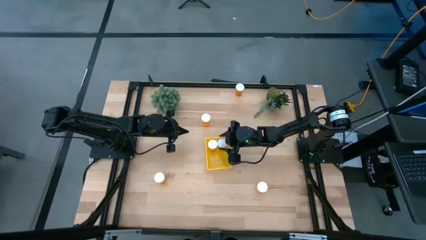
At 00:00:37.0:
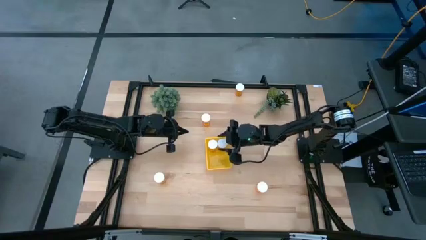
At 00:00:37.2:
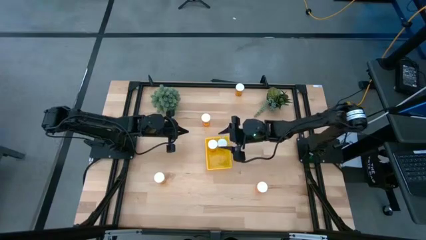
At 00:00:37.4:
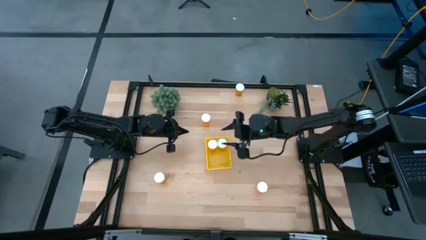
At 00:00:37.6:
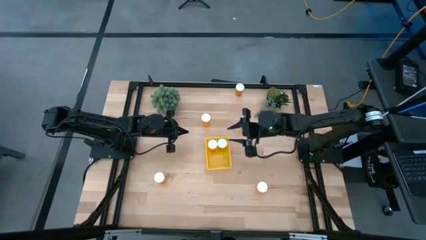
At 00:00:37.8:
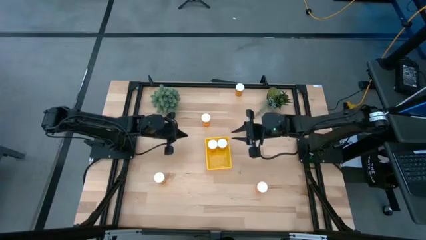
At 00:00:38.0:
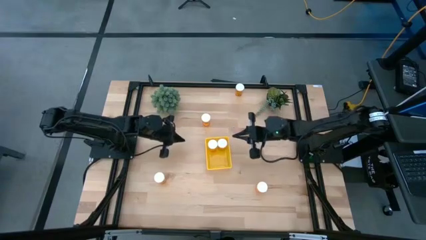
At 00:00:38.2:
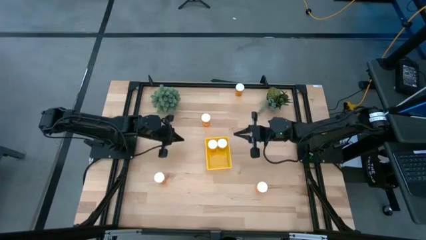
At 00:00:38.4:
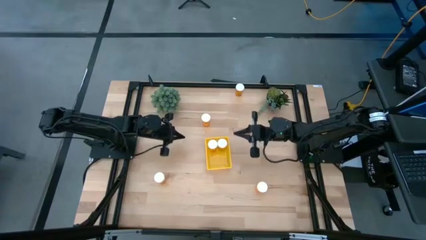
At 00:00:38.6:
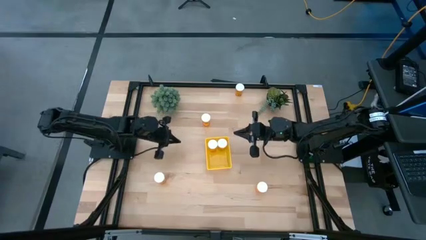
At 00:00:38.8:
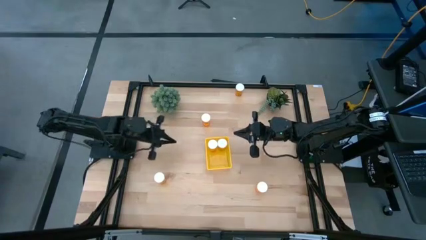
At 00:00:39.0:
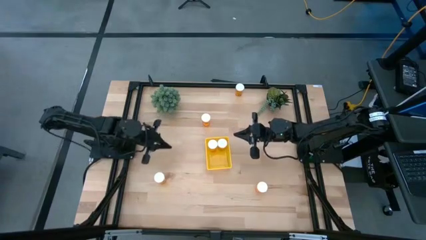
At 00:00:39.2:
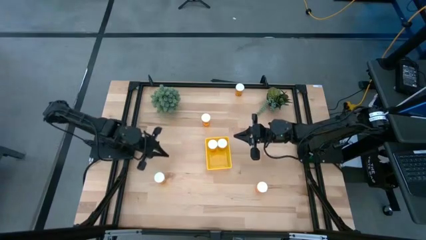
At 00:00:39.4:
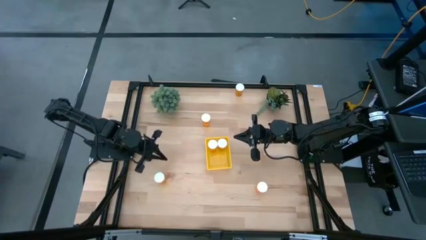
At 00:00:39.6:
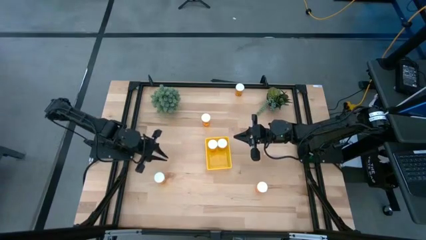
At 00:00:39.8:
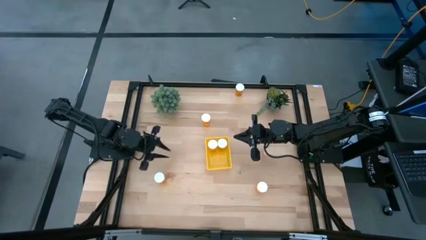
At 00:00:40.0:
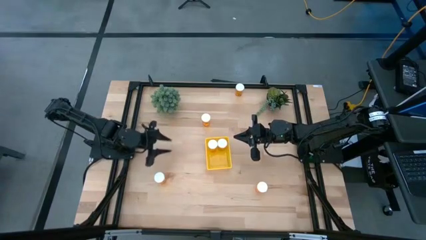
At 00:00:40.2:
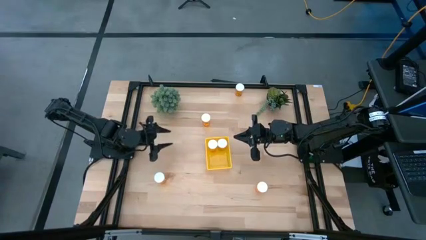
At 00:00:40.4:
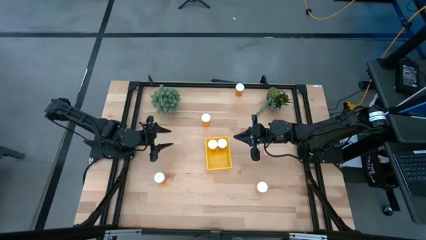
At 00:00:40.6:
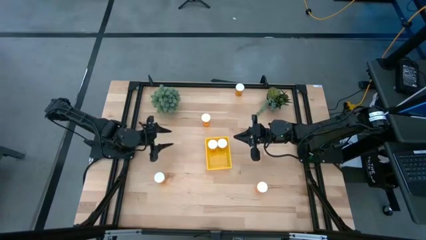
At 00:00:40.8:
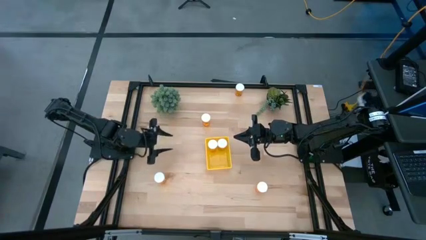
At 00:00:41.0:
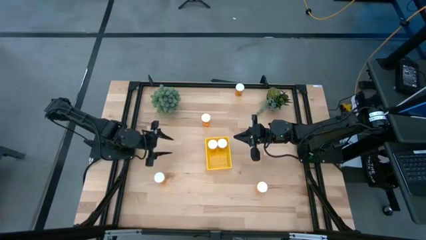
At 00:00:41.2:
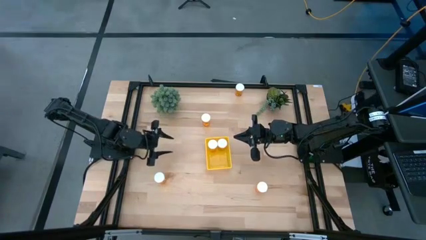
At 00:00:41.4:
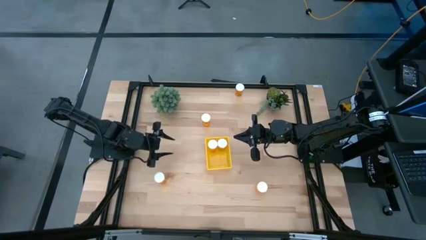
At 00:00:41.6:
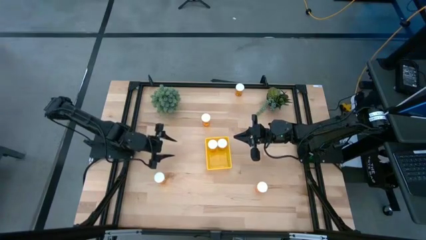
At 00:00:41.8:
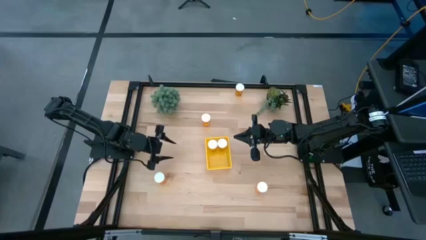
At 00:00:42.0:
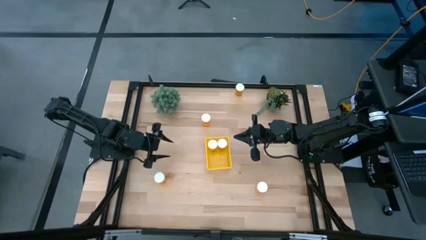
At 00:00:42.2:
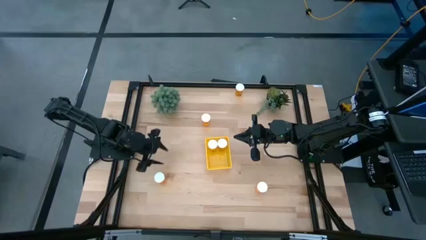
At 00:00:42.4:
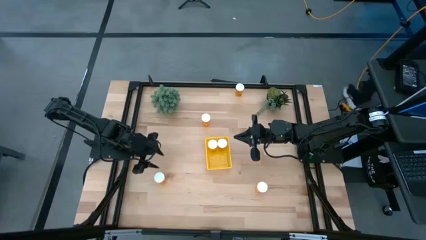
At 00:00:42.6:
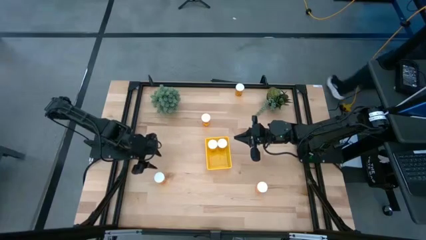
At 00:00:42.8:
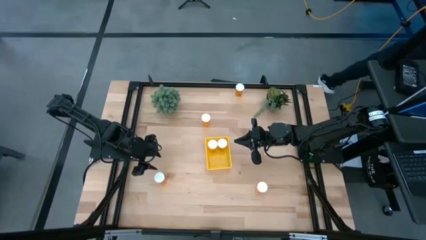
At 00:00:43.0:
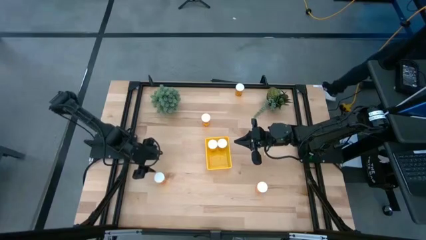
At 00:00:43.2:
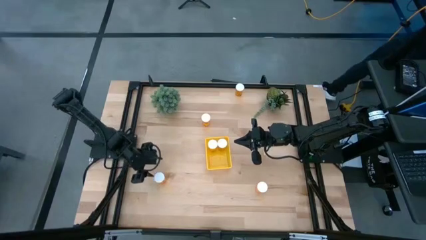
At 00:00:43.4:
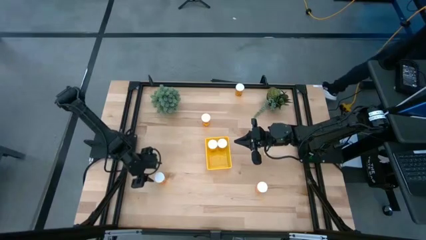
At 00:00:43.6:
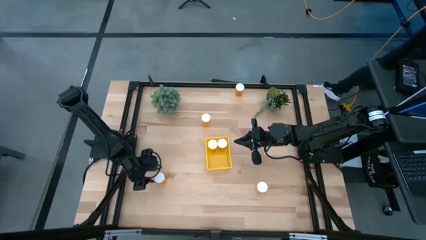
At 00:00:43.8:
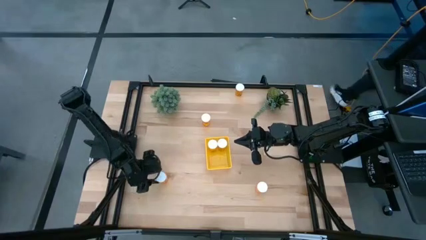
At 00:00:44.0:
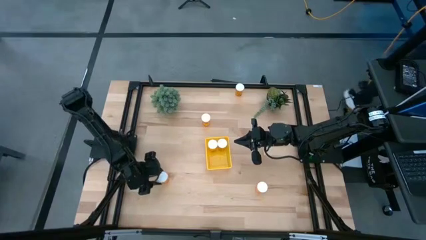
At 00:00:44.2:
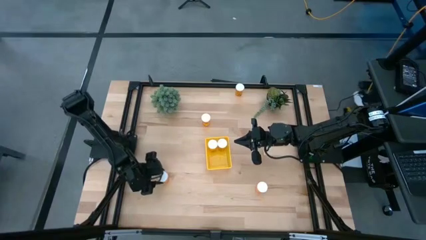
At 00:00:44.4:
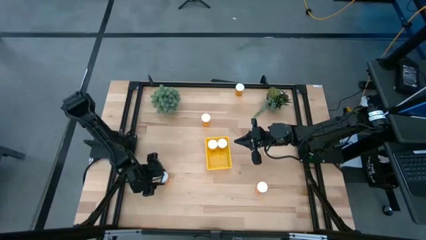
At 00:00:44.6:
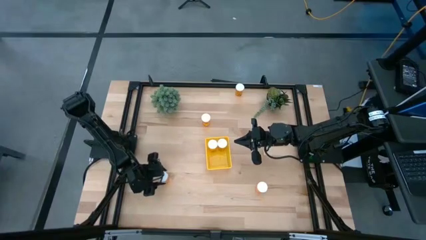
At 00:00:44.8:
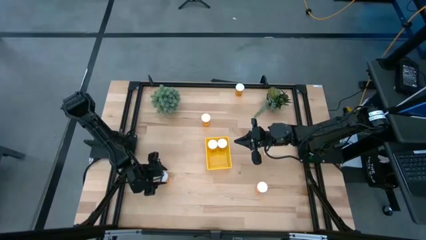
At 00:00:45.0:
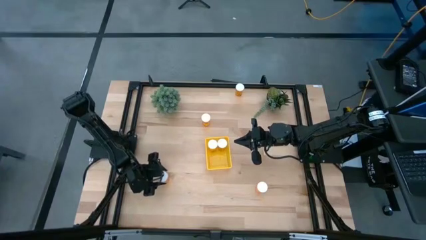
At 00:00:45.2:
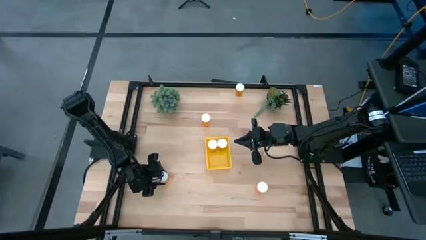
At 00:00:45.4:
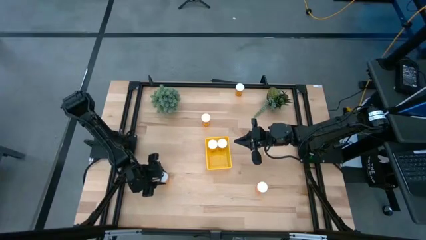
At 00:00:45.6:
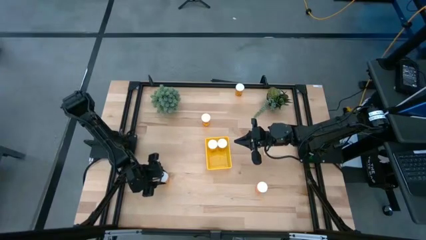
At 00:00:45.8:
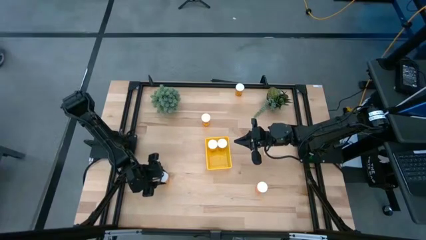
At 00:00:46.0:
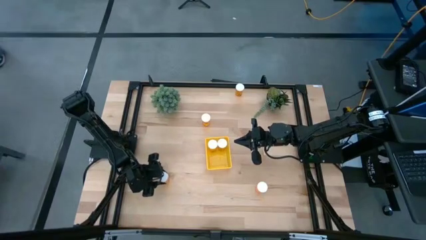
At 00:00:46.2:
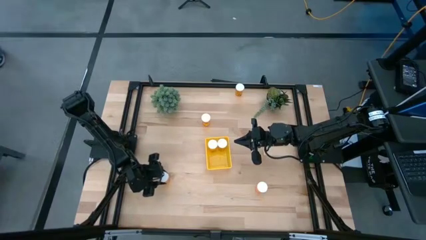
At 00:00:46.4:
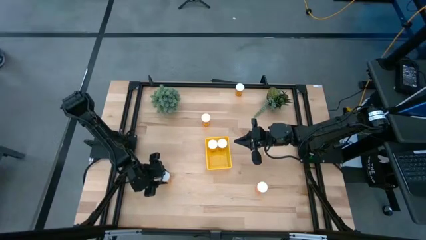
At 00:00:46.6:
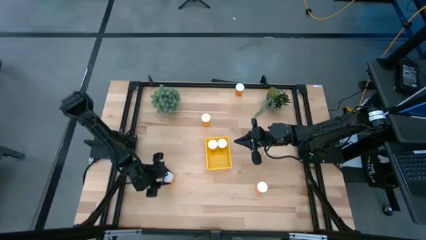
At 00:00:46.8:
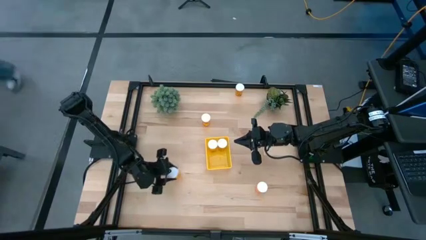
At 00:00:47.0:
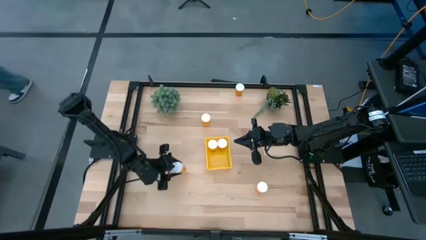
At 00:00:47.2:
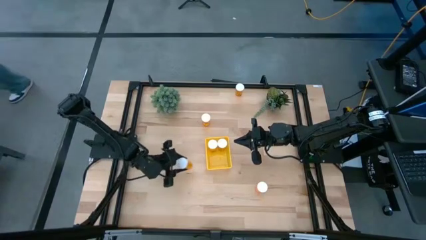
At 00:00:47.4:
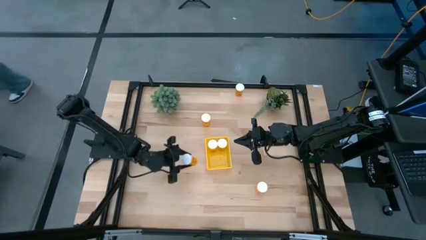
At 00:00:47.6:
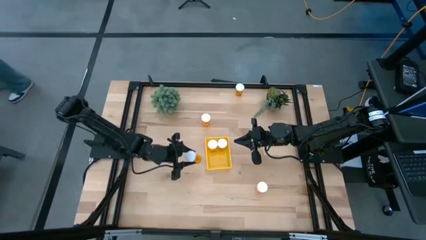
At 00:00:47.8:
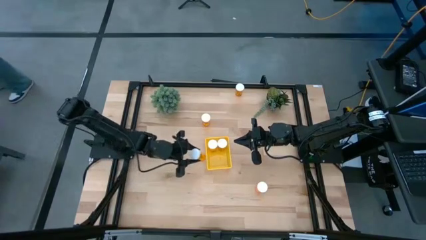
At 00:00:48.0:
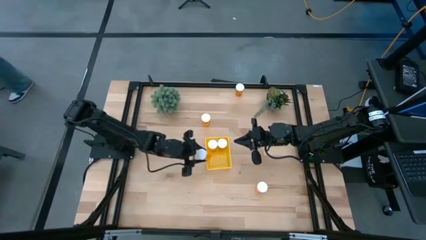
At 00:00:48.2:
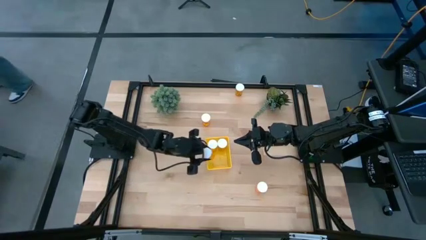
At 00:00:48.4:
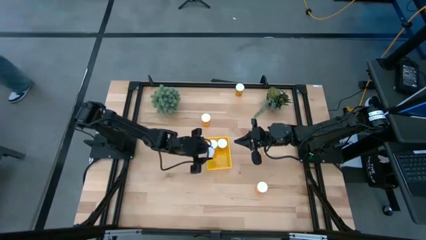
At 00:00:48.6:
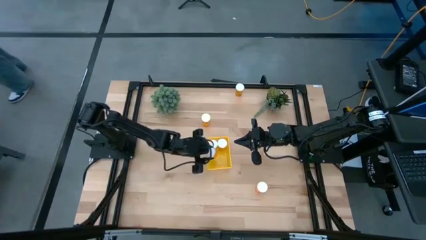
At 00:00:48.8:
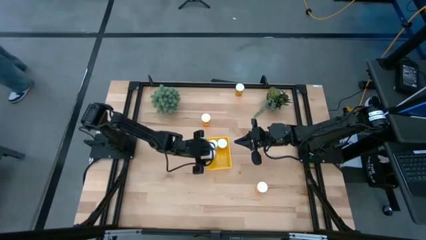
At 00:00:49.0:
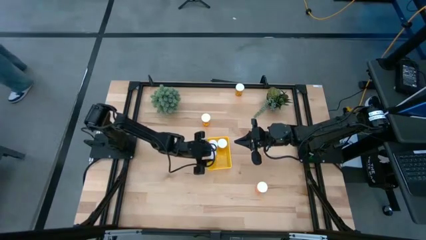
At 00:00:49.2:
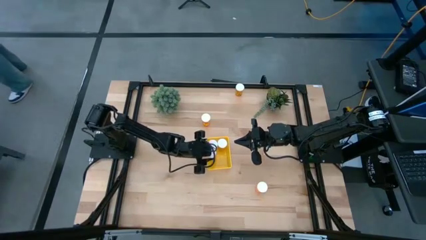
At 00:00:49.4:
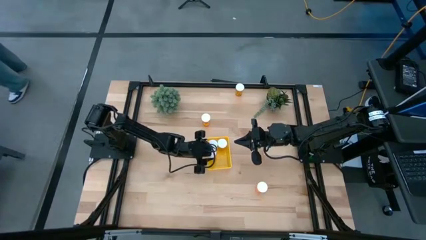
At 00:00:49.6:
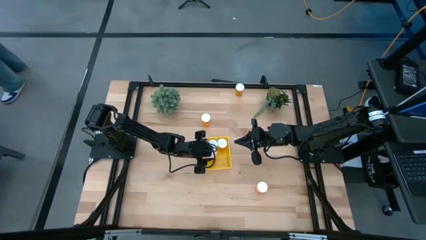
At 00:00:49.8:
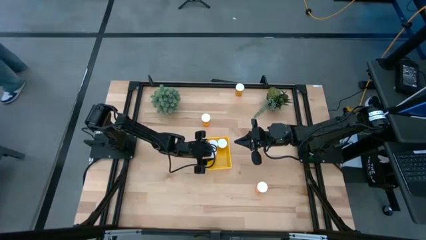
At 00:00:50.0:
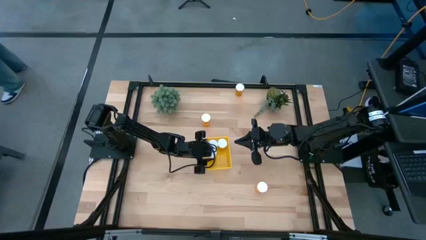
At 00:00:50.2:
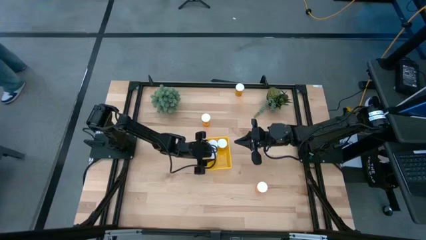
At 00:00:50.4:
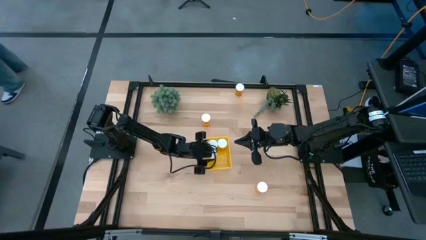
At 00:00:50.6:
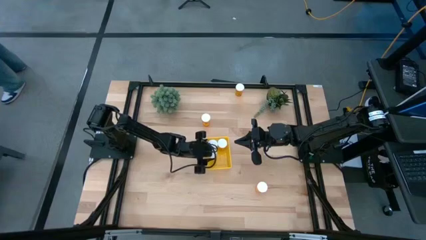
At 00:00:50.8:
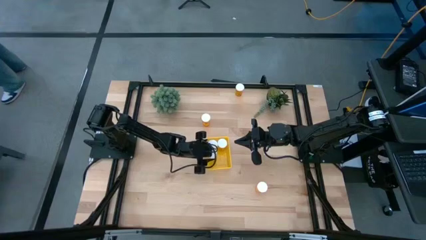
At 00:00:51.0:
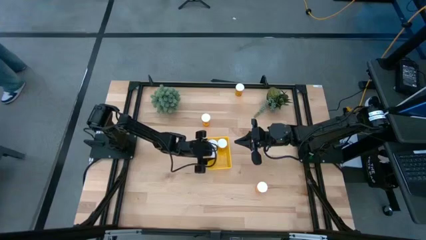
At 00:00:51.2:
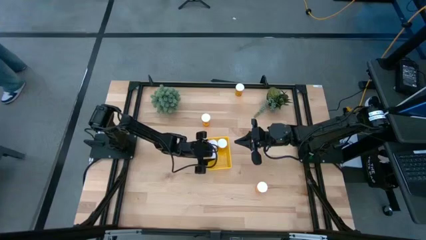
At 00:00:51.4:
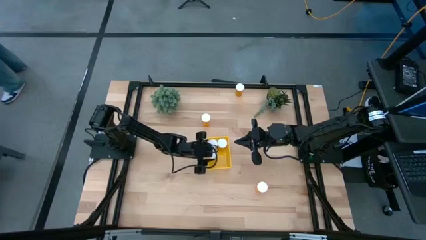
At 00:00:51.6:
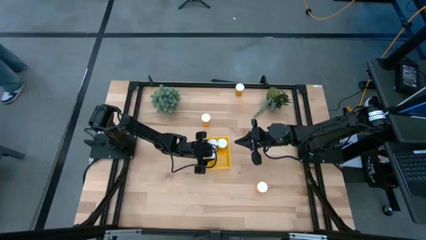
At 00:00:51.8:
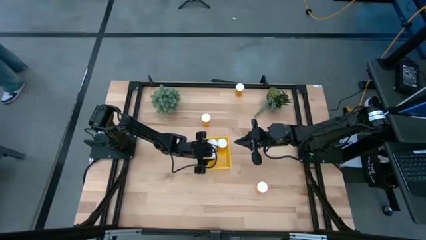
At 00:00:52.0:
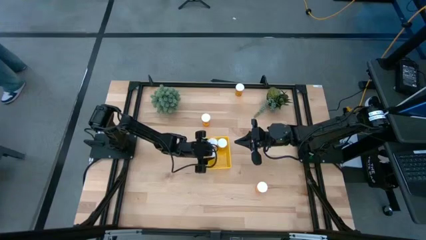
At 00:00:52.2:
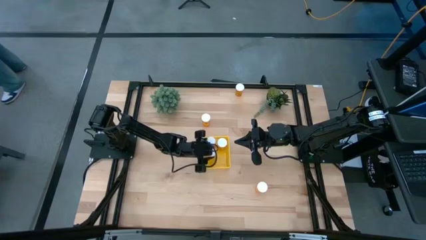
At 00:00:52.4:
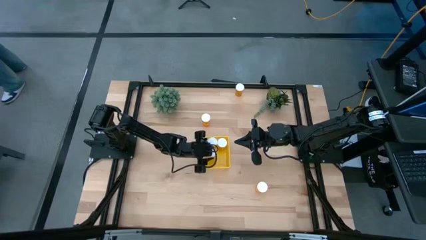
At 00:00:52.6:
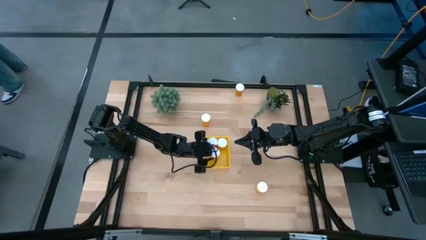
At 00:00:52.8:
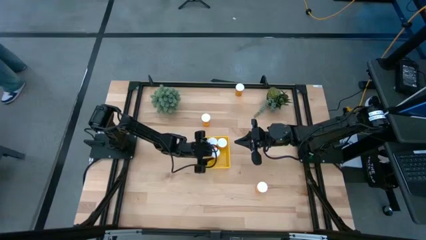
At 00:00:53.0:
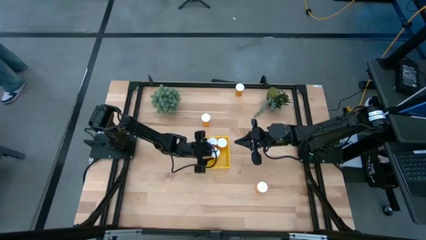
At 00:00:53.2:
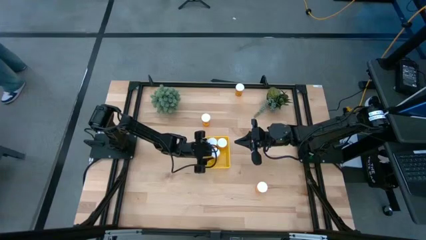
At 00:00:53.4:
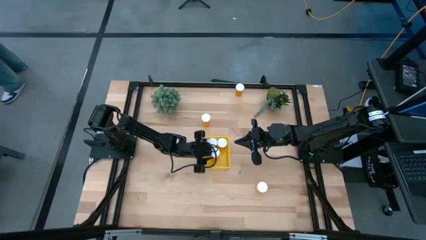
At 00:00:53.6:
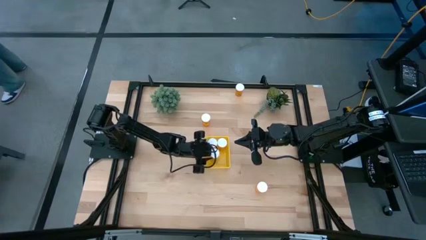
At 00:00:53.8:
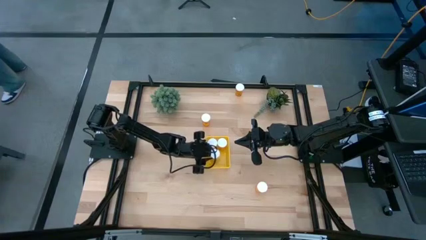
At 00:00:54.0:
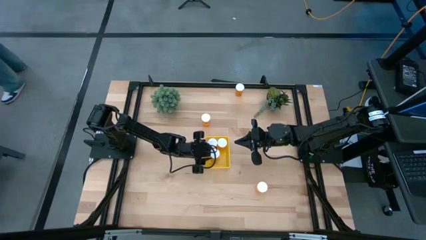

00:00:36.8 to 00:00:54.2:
Task: Pick and place pill bottles into a basket
Put the orange pill bottle into the yellow bin
